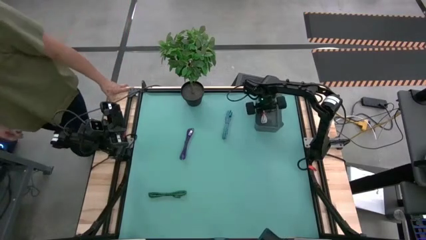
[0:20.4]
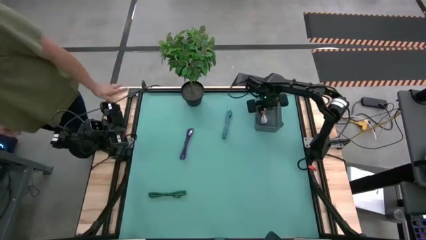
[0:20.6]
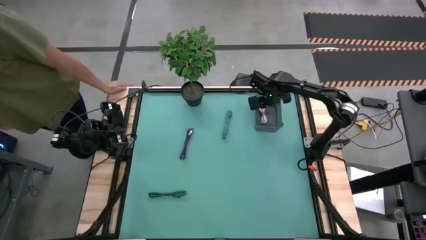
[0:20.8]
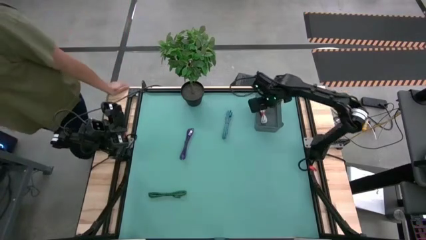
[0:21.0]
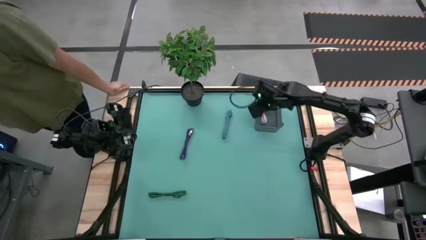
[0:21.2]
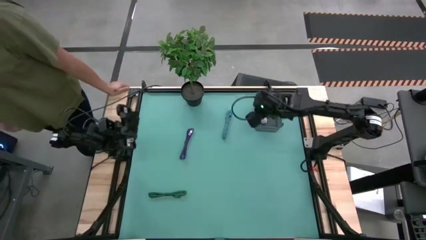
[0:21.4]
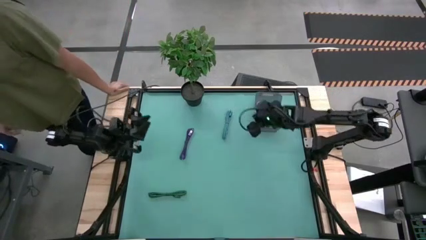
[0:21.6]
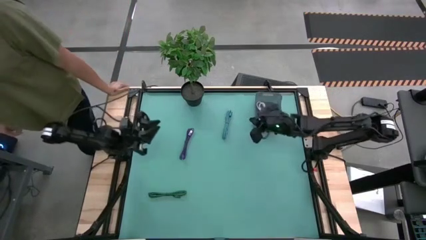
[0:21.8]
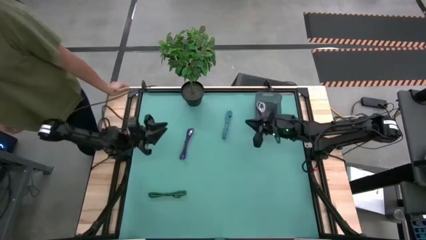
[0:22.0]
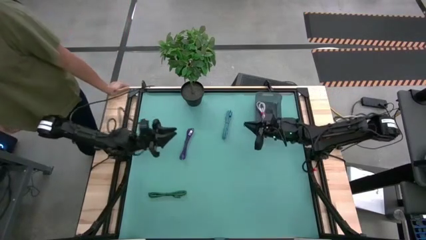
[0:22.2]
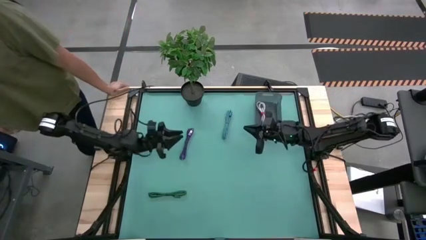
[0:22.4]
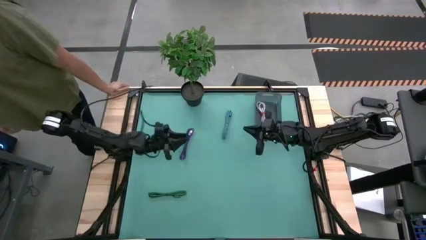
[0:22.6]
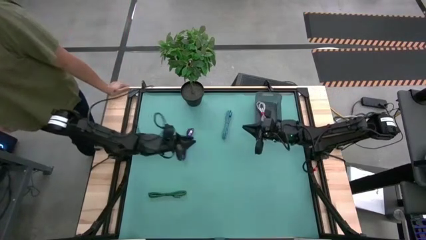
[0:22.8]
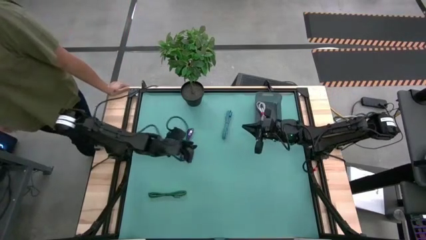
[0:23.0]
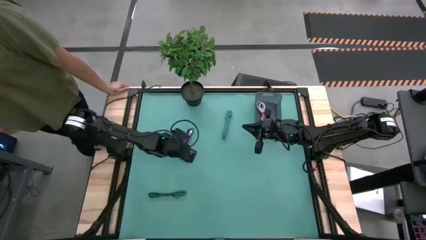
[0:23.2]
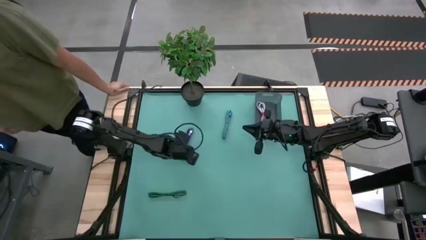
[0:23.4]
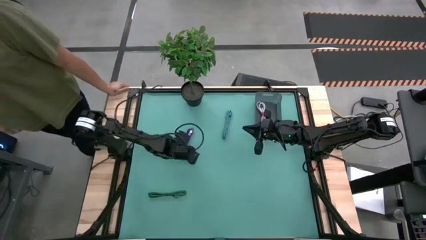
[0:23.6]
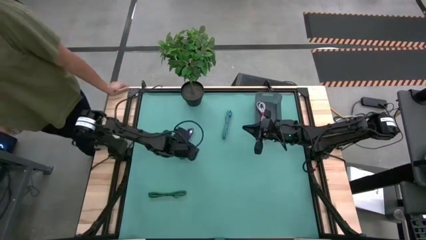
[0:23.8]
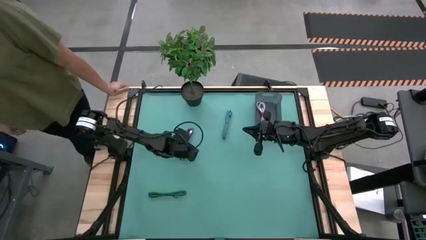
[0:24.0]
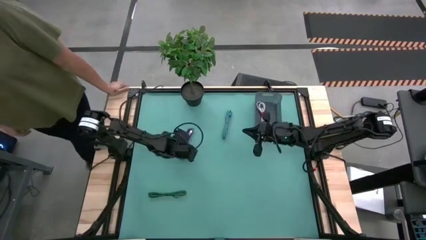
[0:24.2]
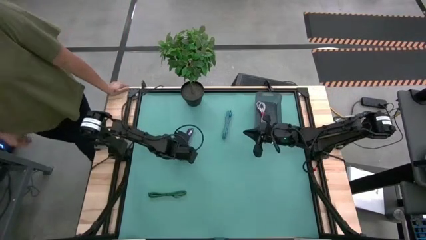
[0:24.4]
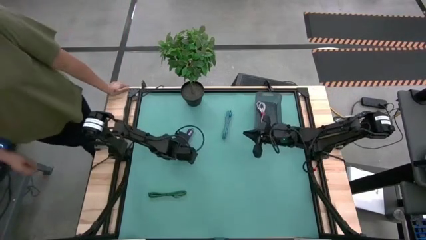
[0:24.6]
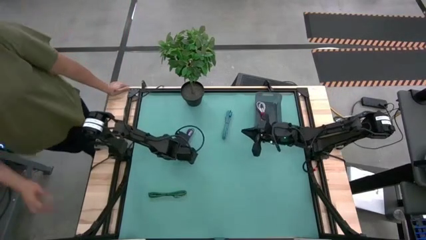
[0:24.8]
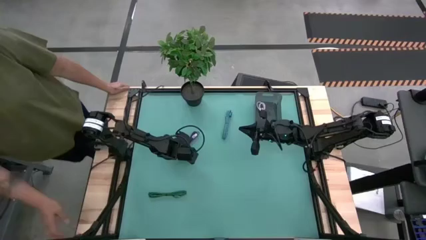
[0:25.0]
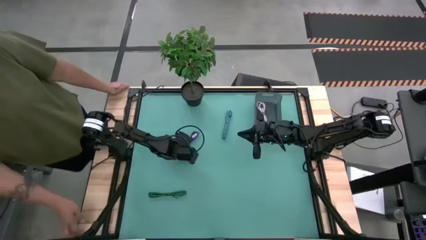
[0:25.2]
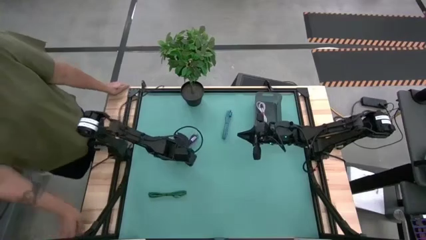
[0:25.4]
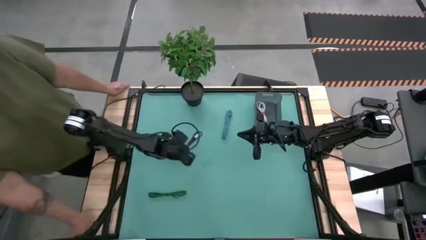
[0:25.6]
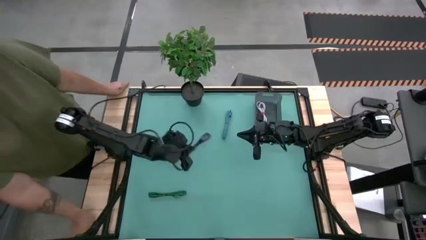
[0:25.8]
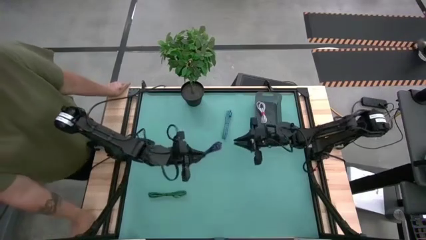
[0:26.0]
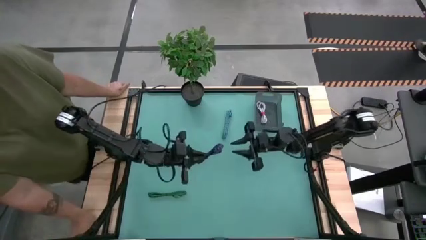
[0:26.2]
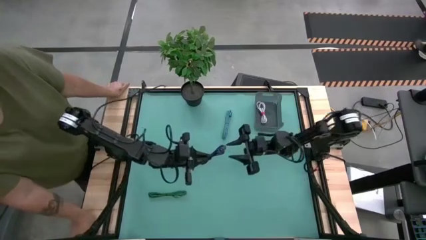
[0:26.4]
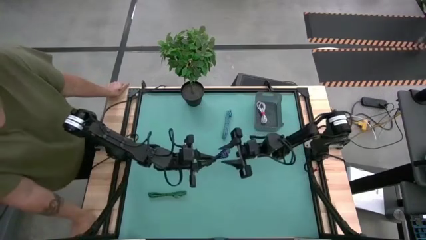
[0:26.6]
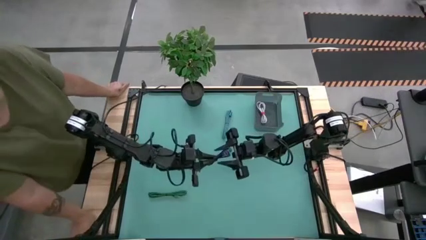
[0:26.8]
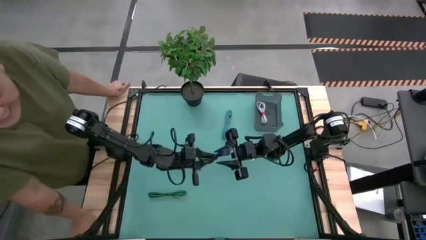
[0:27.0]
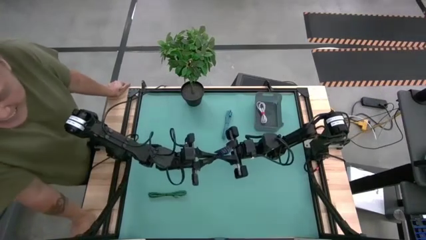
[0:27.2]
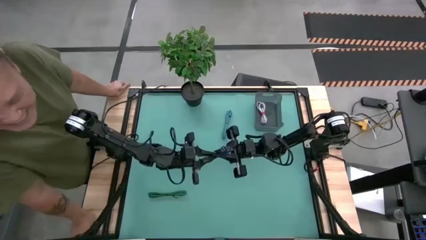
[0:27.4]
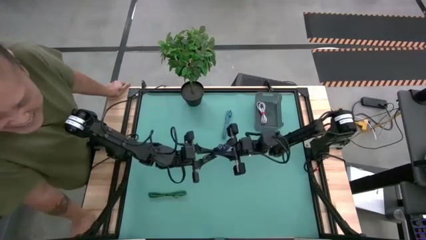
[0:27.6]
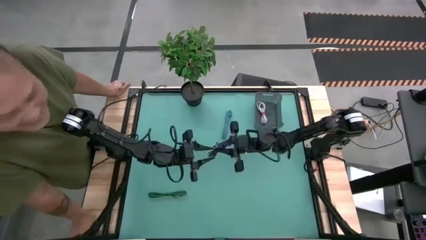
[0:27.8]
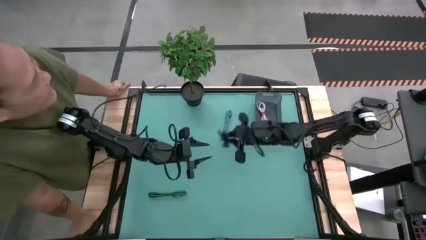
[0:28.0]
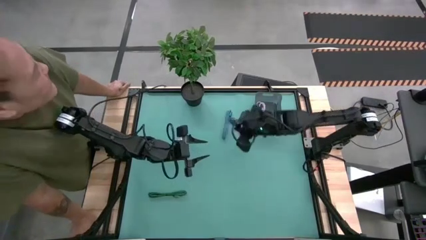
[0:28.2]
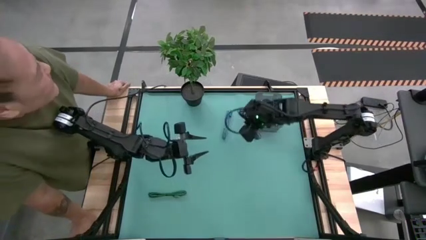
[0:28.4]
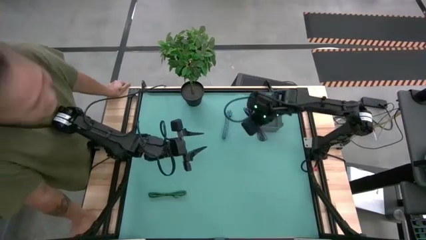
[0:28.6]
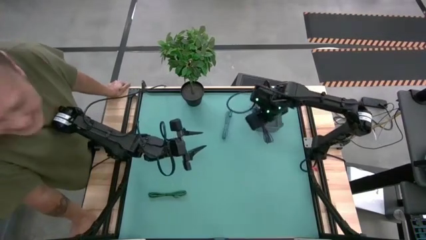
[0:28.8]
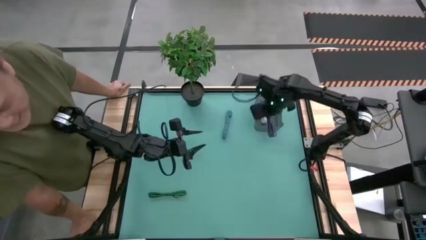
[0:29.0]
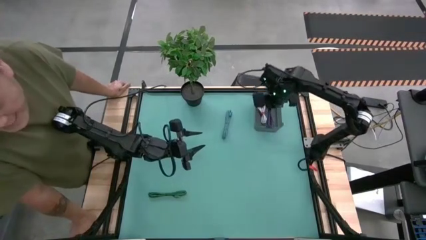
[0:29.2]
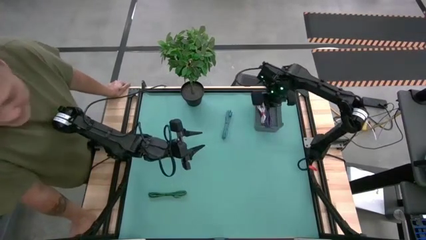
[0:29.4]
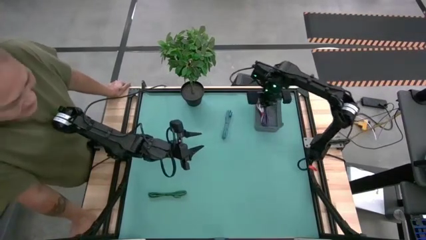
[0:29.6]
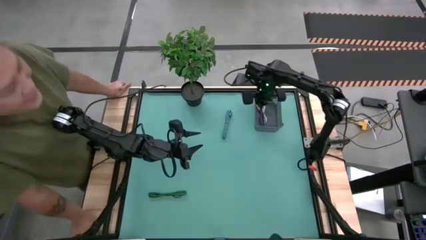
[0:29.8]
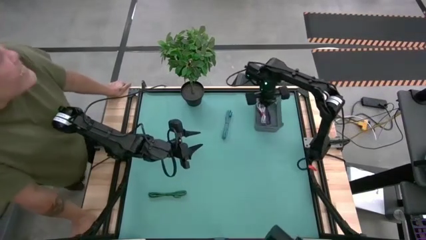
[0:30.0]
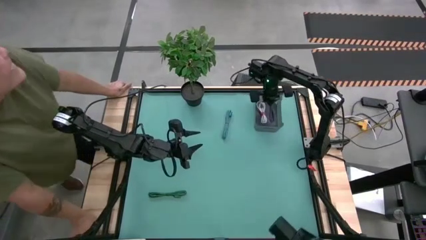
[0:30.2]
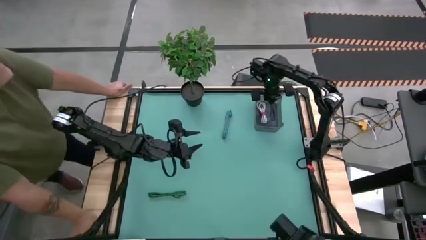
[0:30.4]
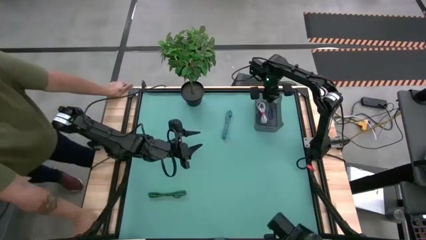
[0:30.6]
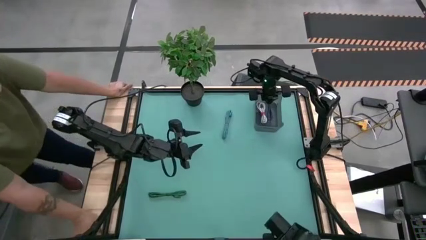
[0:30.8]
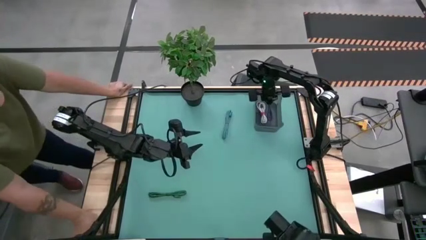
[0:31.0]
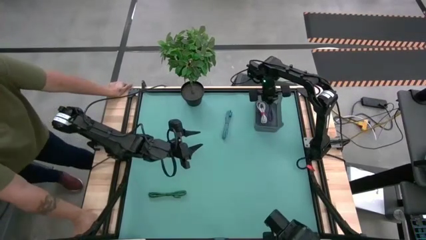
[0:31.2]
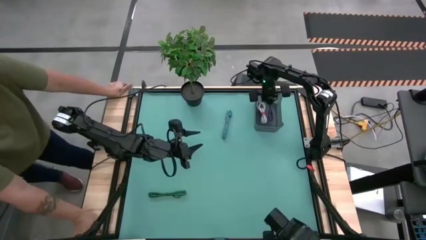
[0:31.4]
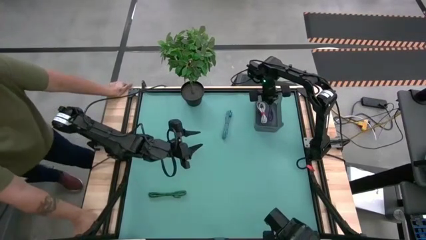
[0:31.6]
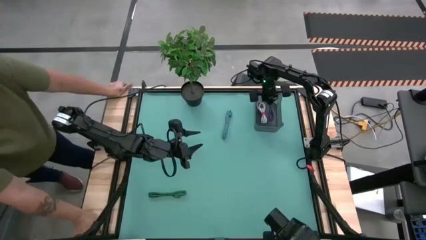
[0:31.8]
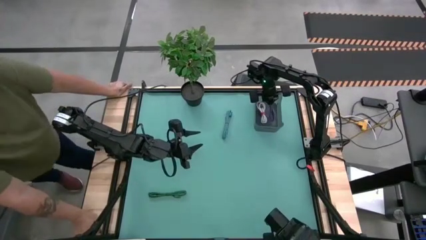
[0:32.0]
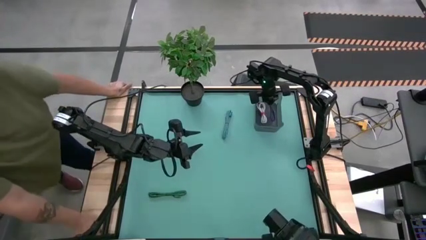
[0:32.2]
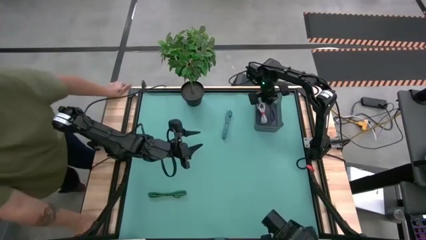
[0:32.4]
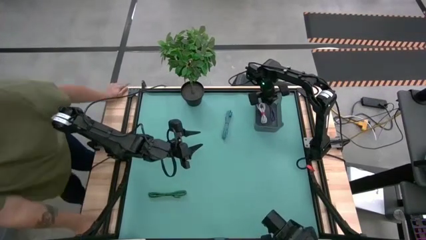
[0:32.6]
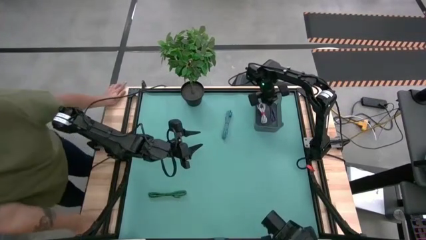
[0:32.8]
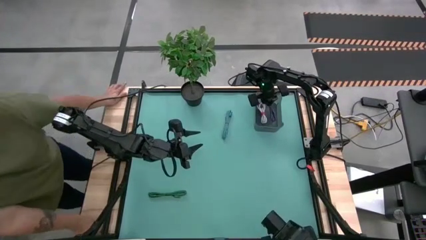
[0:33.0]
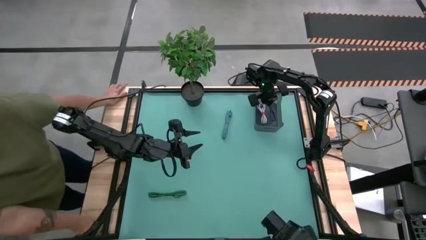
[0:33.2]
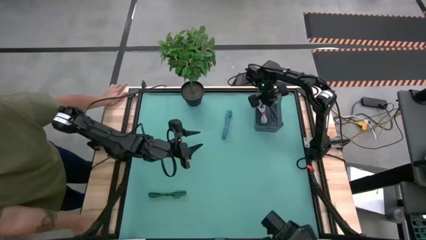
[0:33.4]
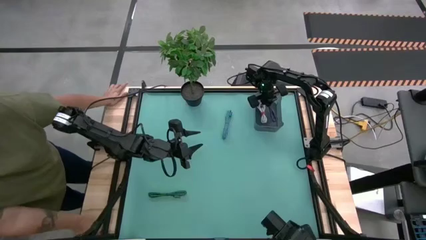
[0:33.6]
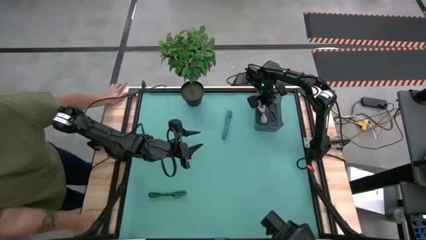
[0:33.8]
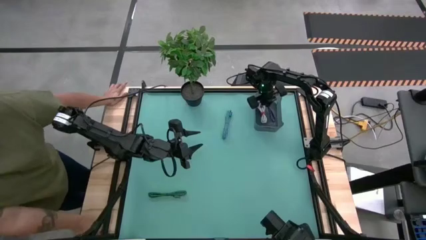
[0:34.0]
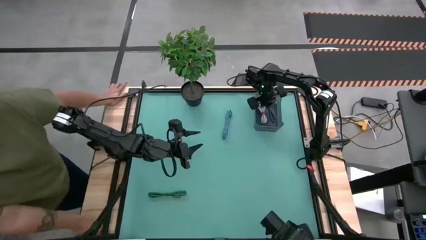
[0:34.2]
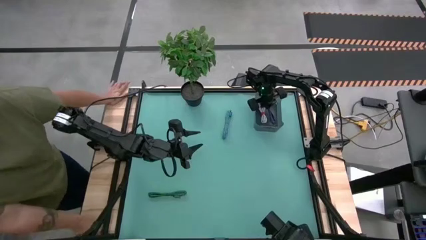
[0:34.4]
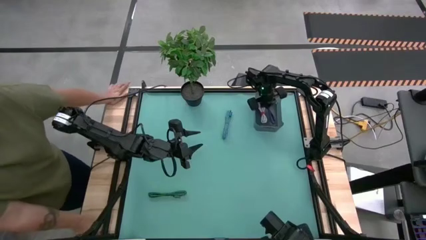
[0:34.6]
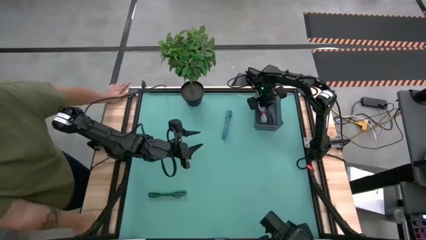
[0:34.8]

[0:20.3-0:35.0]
Task: Pick and place USB-C Cables
Put the purple charger cable into the black bin

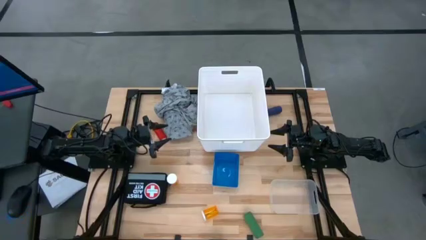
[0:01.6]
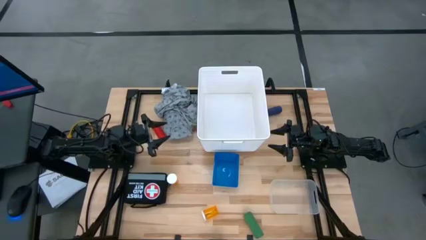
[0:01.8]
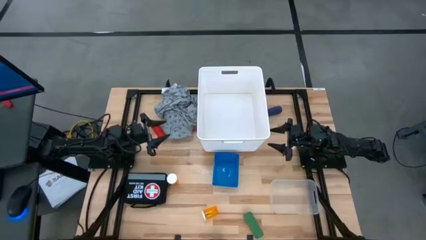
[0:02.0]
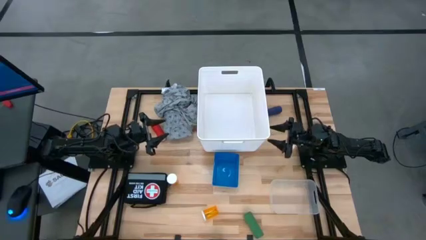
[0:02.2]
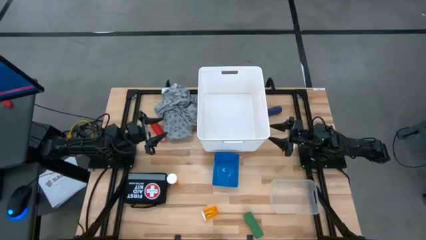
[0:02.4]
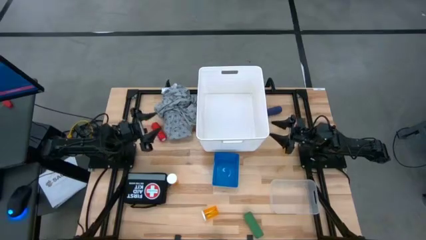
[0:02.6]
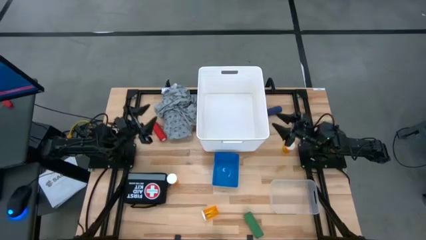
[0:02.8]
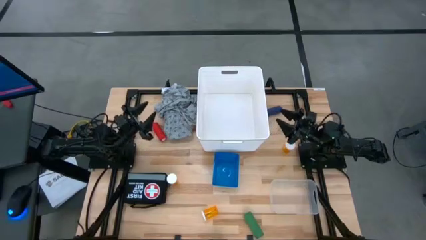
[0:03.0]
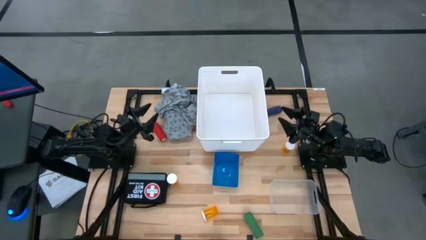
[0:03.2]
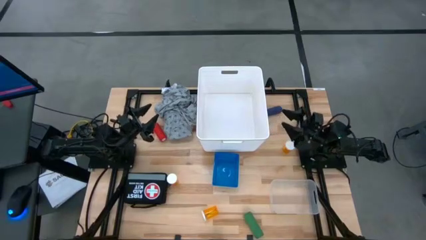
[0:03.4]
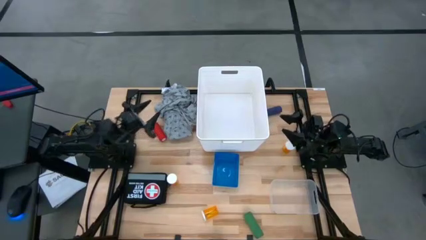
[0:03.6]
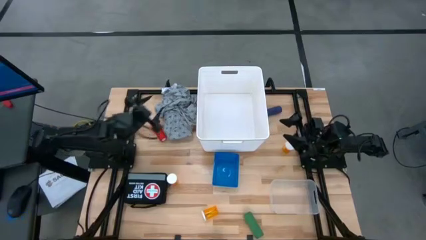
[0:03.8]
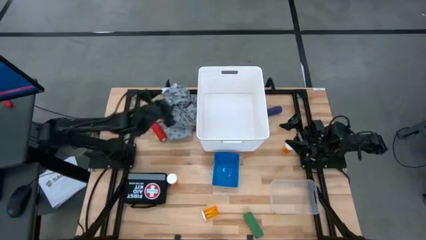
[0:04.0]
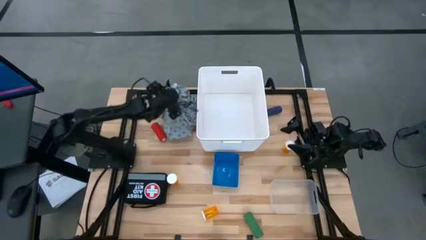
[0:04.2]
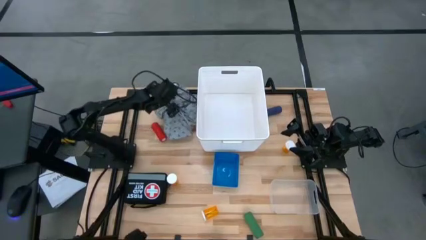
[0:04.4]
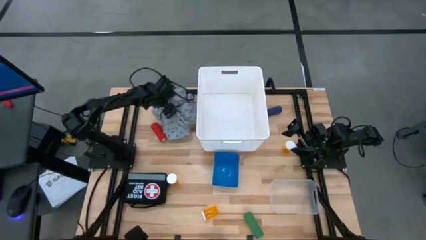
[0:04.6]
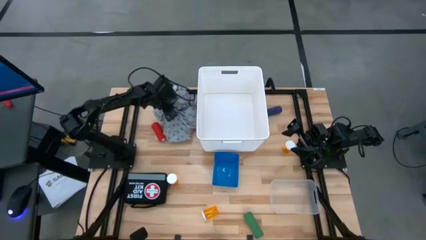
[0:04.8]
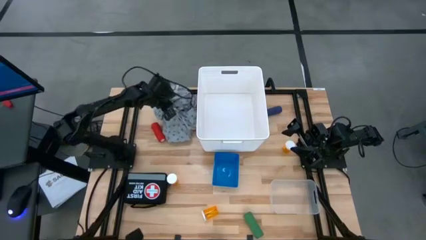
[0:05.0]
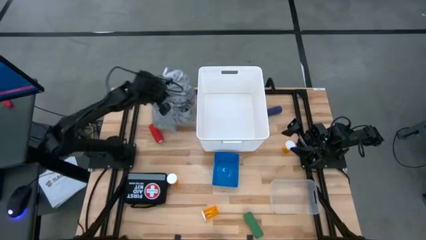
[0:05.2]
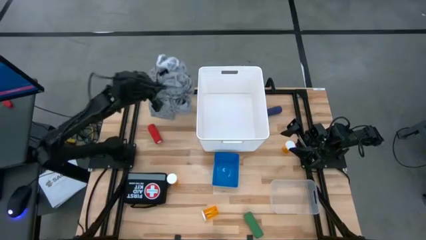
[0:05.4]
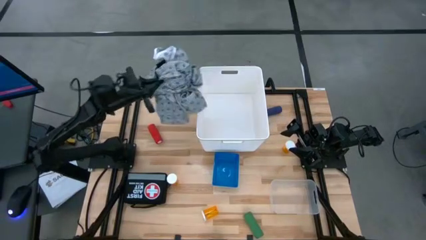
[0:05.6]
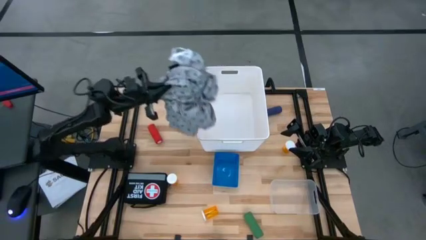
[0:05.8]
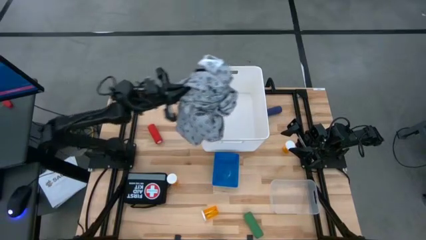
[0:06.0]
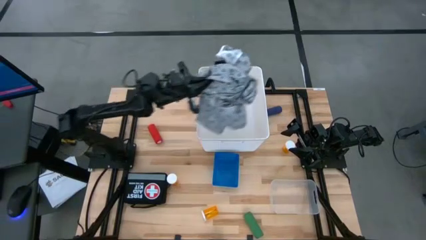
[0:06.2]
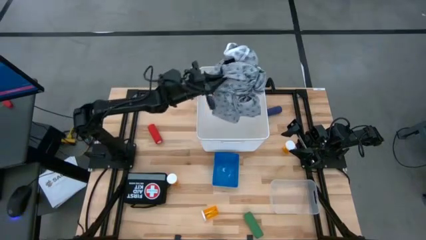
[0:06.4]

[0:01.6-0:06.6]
Task: Pick & place medical supplies in basket/bin
Put the gray patient gown into the white bin
